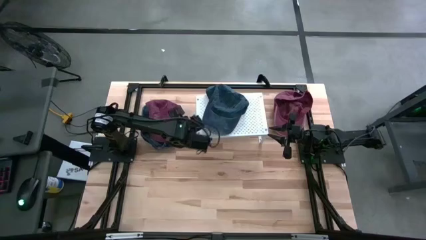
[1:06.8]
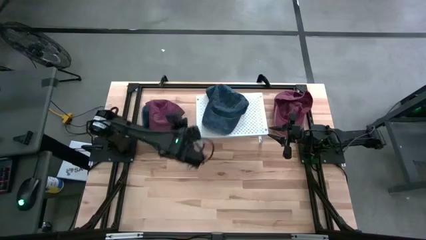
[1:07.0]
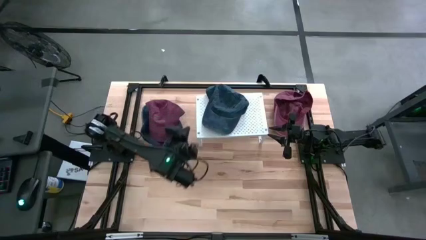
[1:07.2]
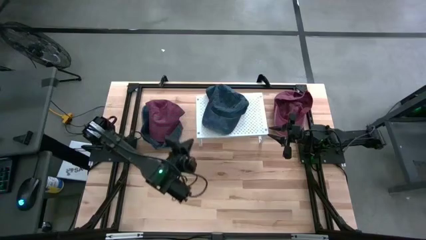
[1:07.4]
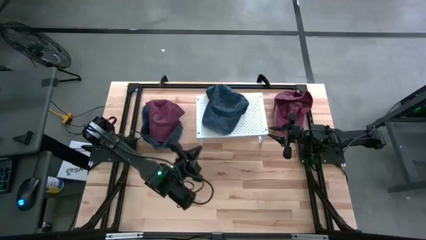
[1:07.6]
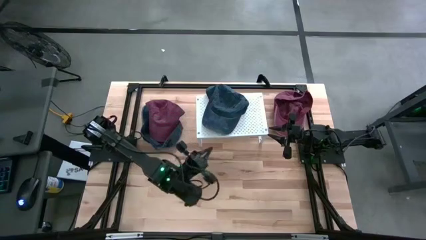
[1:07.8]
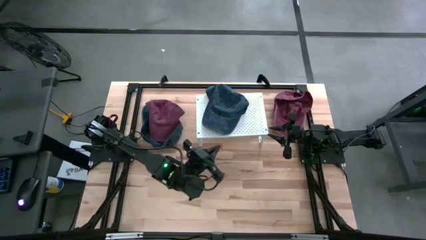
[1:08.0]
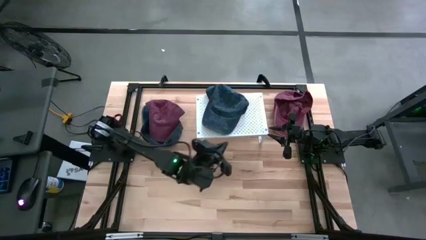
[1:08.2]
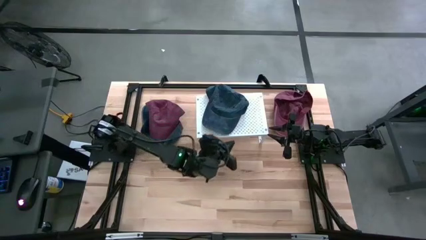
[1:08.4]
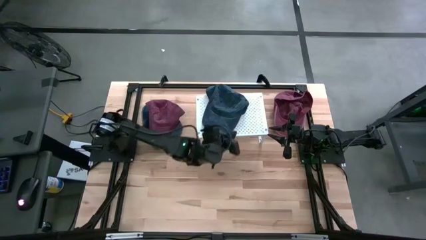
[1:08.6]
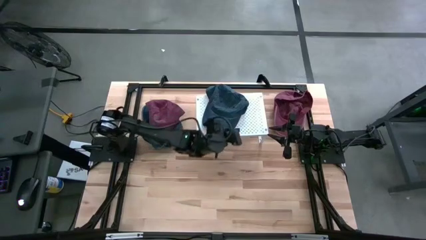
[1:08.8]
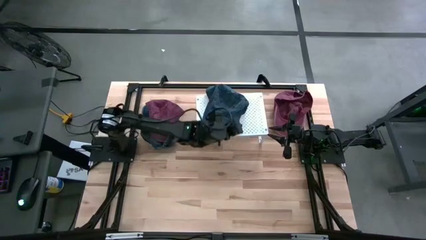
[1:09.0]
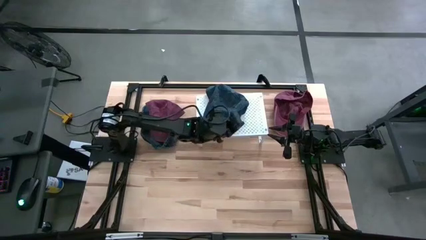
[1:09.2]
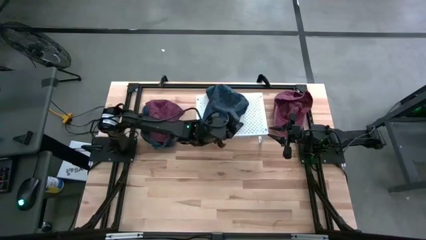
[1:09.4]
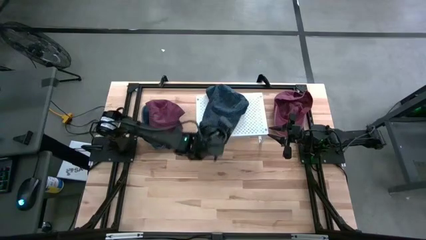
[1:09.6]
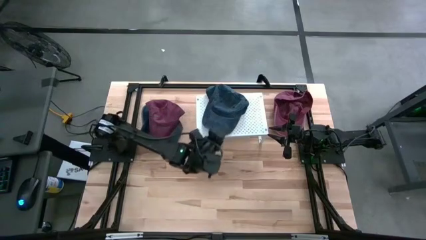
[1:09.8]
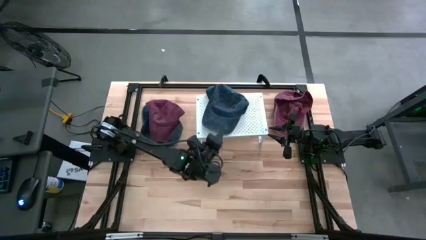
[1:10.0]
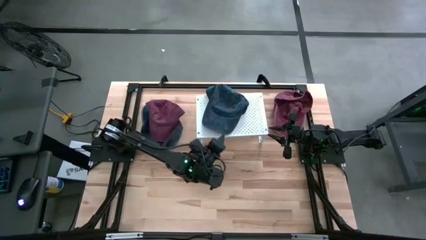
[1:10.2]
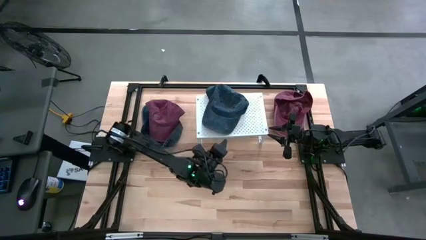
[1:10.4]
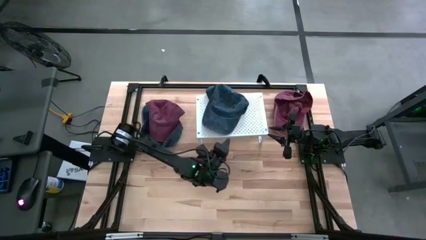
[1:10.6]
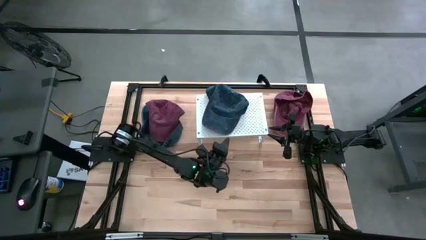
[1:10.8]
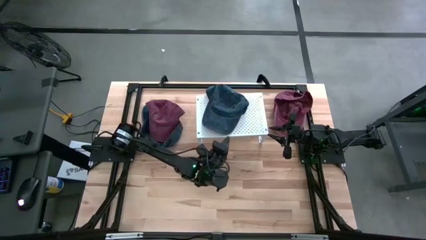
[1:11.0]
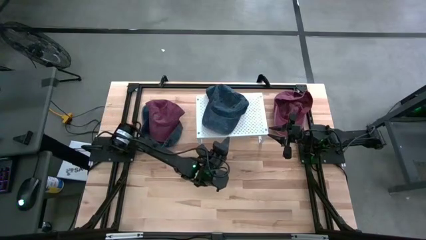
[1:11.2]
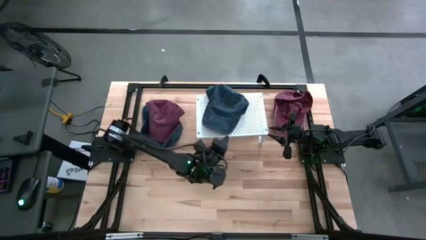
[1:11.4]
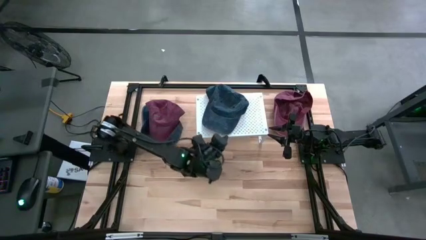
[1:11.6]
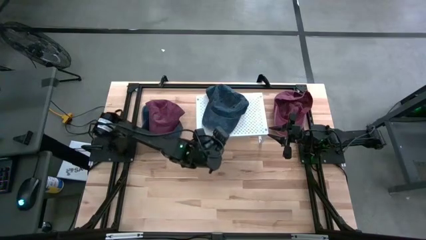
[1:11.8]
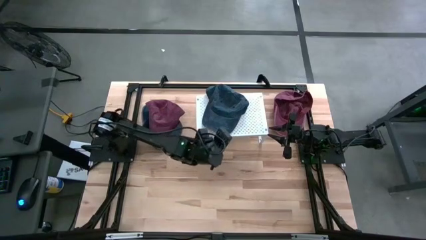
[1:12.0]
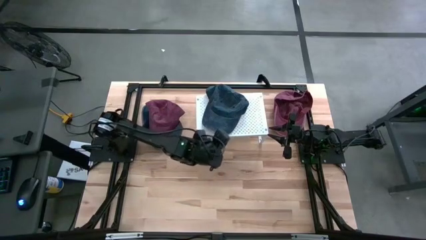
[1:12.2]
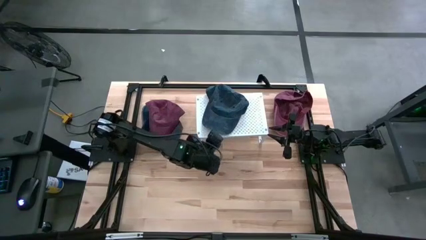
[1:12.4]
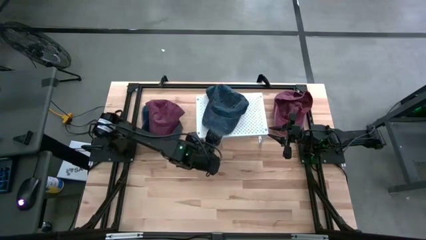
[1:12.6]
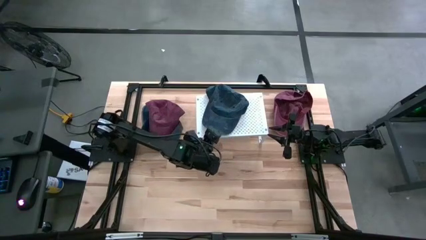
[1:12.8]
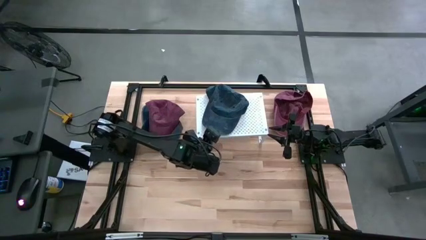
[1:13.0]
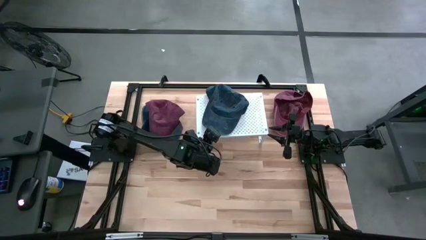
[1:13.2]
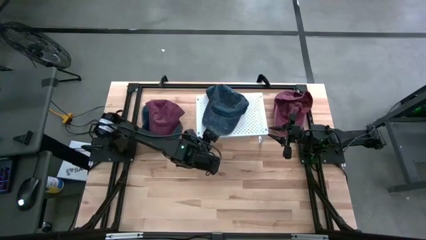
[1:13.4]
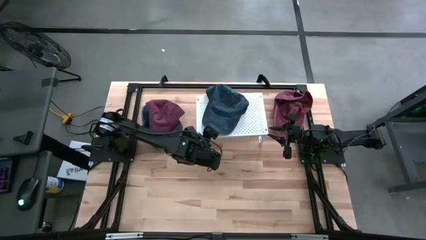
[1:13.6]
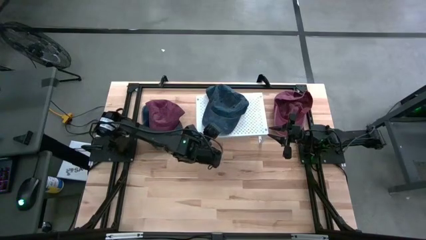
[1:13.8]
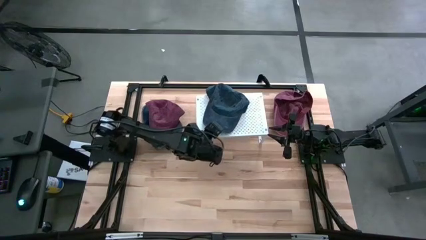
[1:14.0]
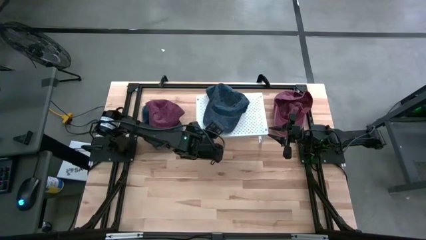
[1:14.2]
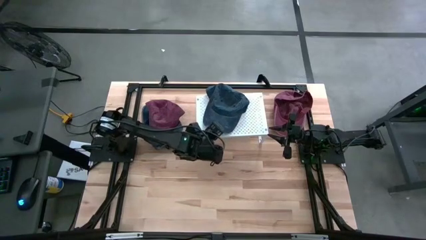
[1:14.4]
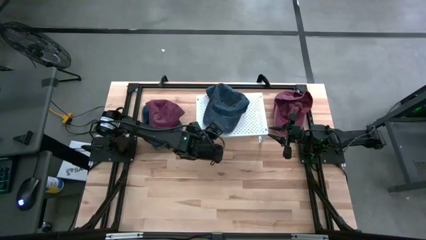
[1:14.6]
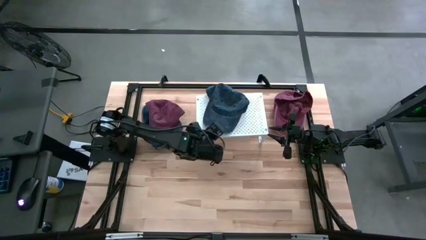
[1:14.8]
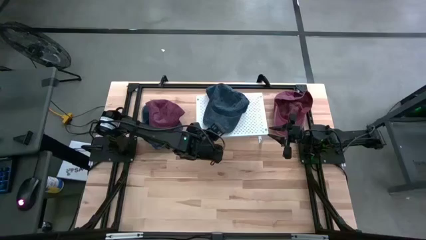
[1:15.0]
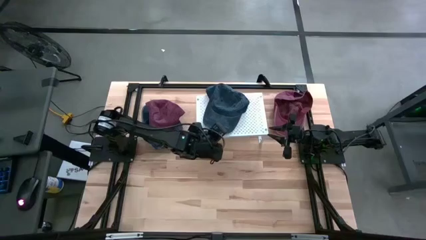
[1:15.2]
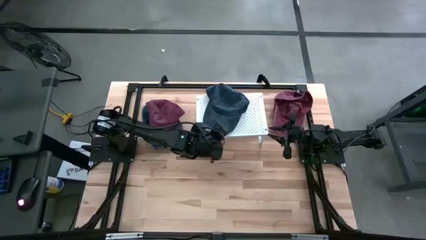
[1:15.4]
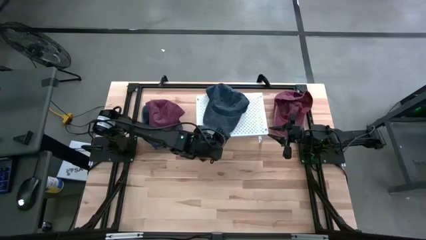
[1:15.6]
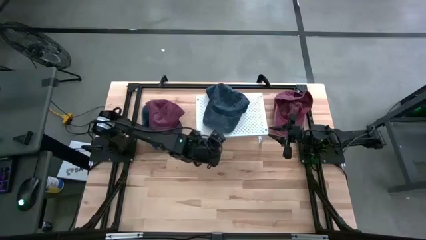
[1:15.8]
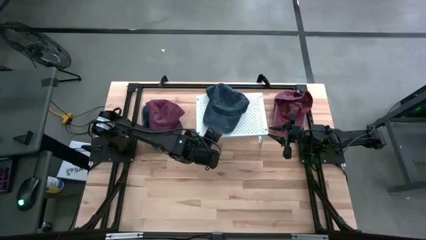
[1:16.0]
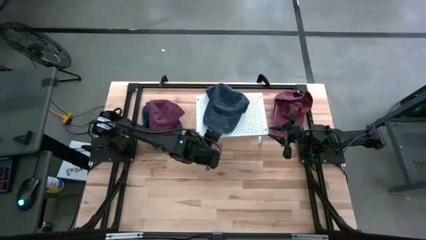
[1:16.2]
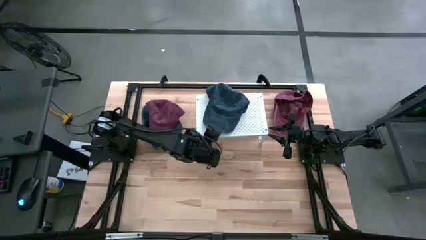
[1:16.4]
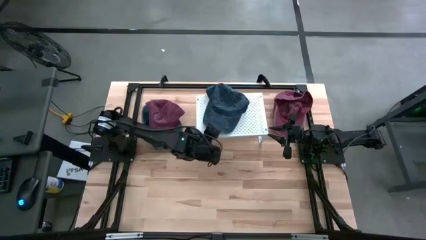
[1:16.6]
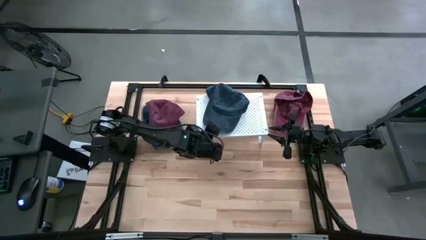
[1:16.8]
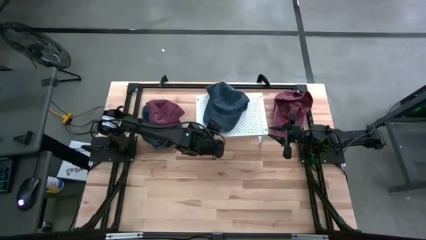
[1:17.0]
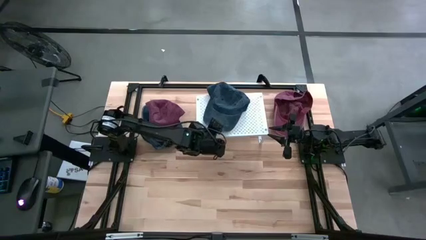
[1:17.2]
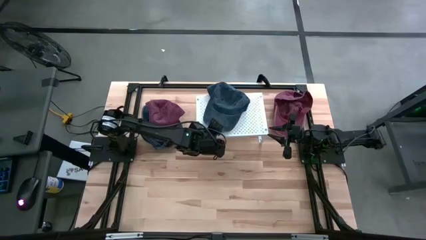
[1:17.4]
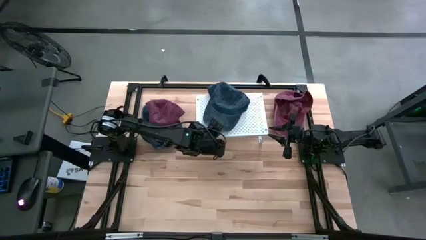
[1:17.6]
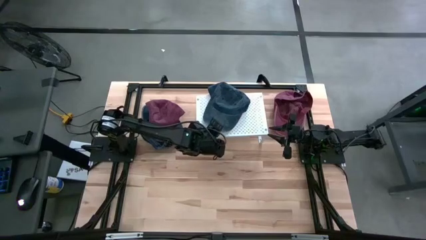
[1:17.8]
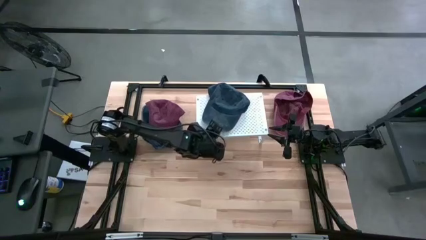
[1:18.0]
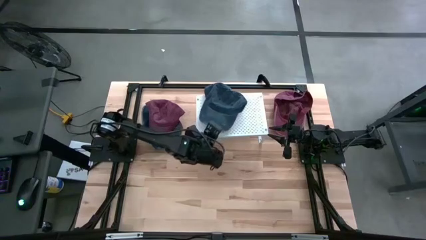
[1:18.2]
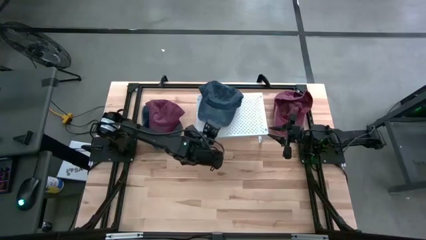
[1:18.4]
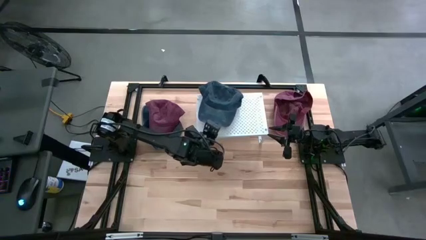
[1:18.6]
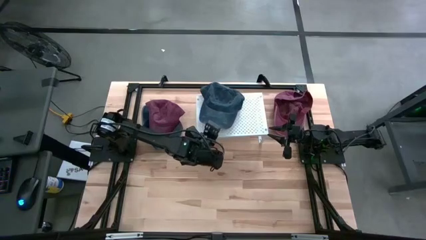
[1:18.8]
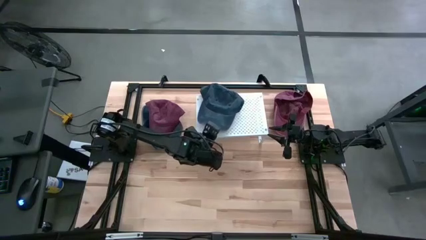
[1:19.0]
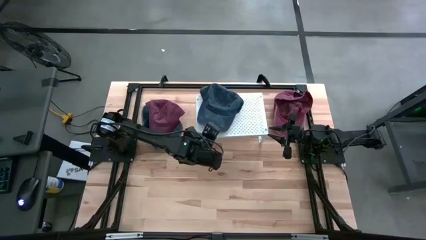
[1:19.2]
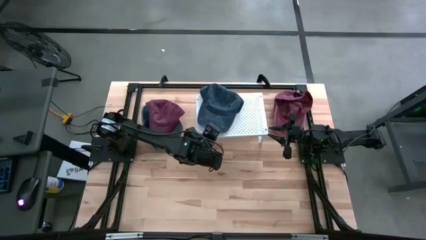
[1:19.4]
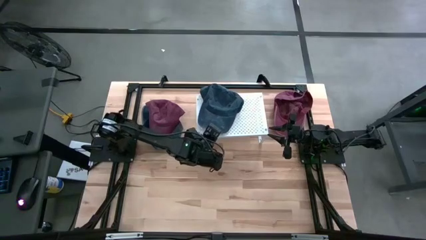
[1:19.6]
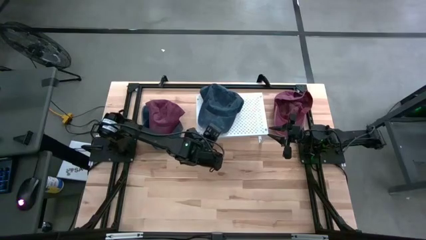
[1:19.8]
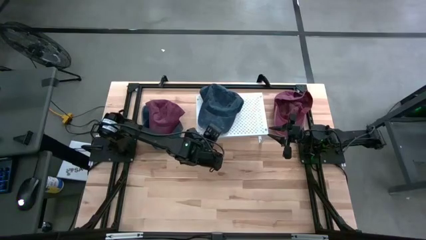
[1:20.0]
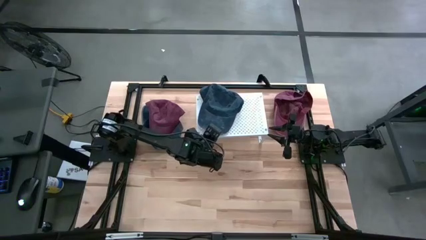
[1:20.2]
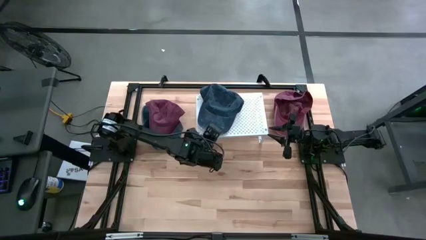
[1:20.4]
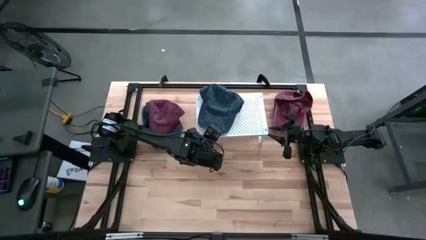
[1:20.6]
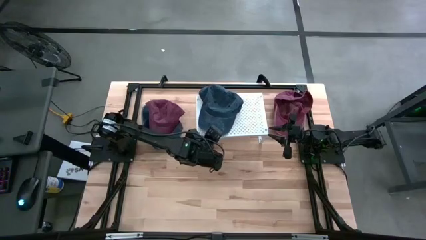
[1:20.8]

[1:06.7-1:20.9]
Task: Pick & Place hat
Put the bottom blue cap on the shelf
